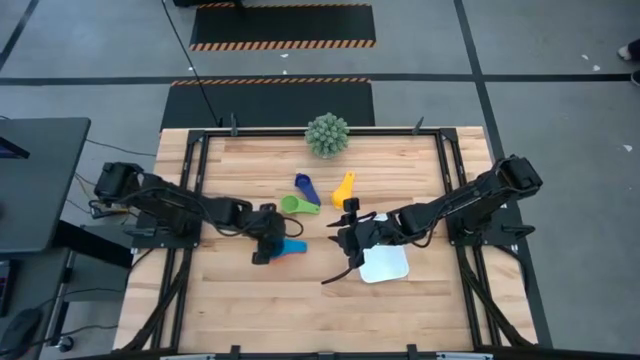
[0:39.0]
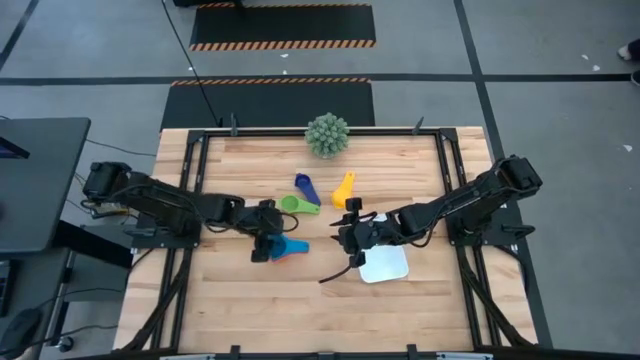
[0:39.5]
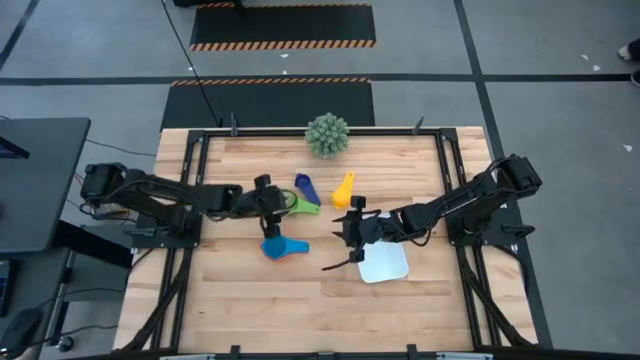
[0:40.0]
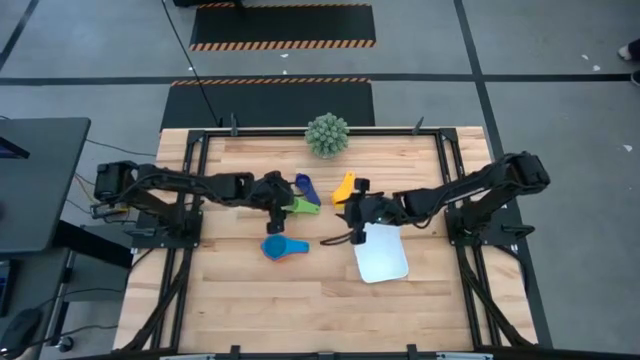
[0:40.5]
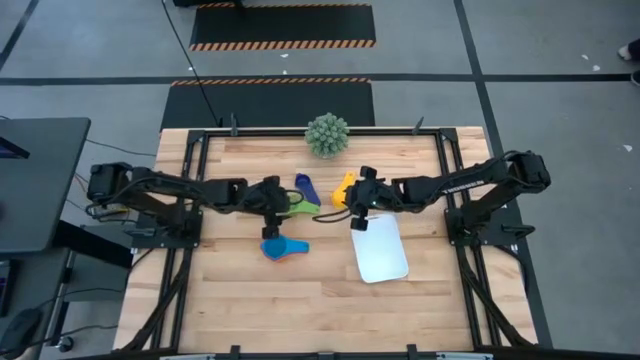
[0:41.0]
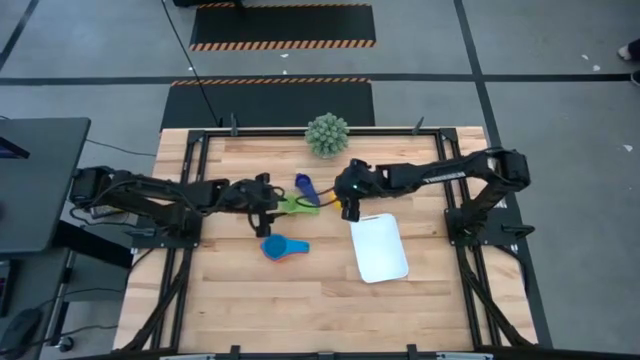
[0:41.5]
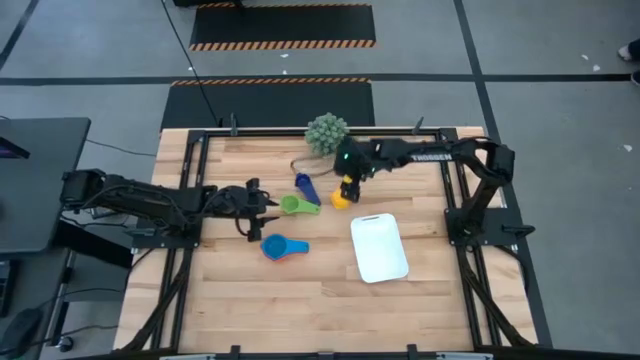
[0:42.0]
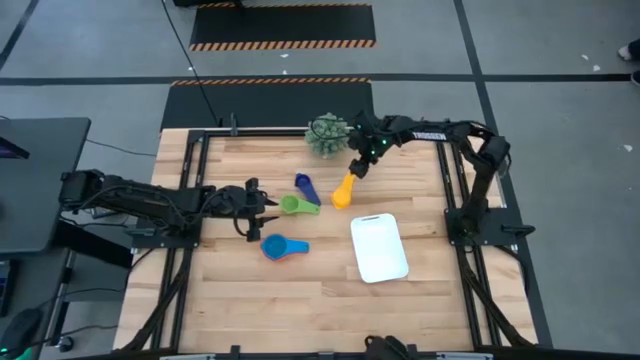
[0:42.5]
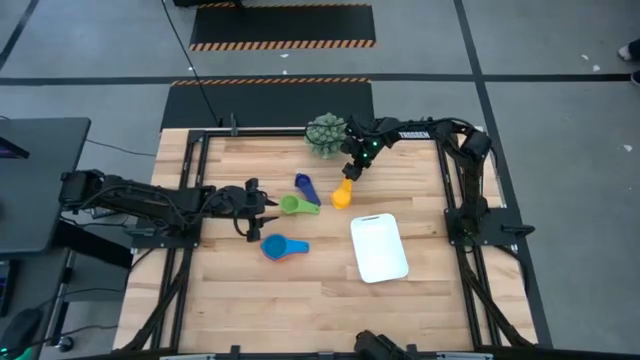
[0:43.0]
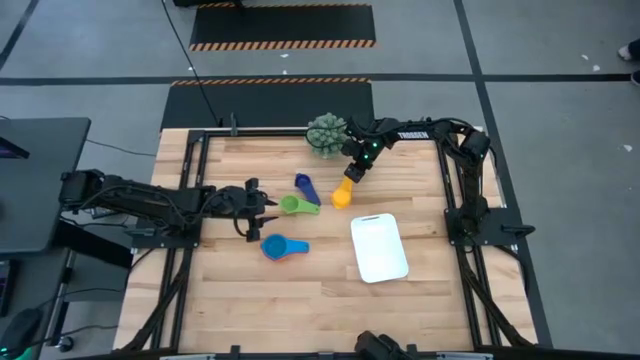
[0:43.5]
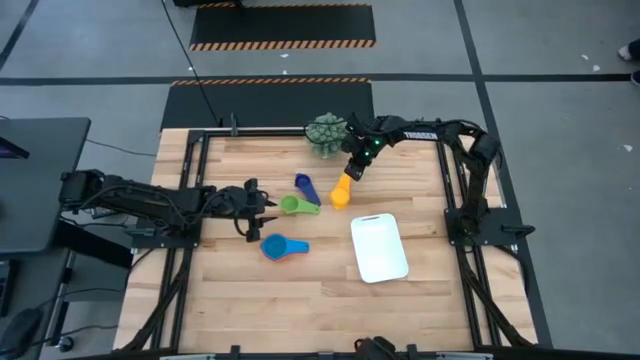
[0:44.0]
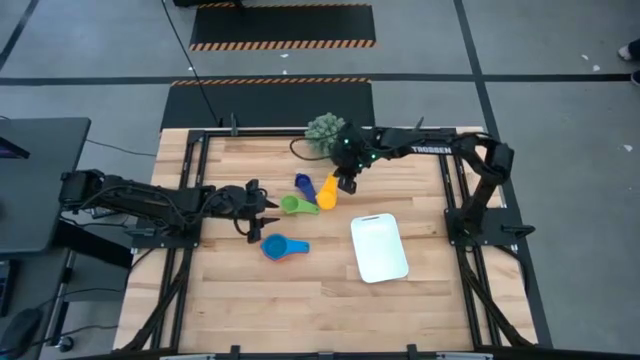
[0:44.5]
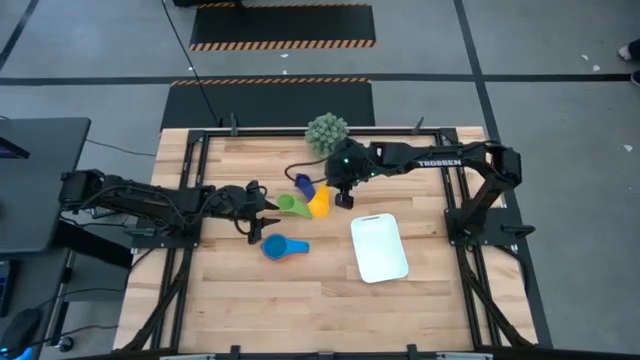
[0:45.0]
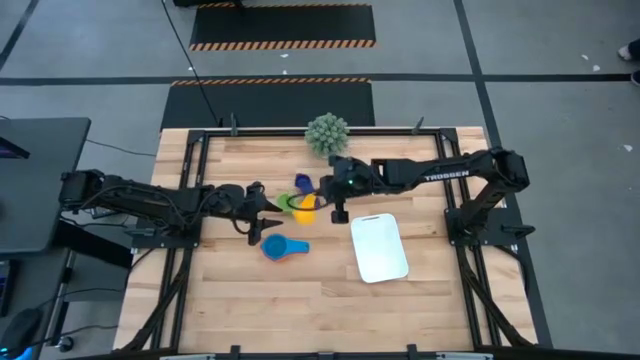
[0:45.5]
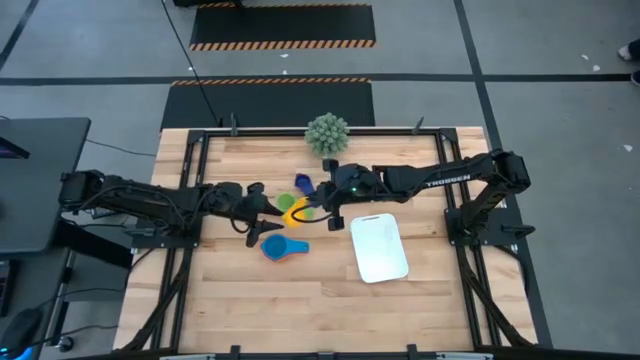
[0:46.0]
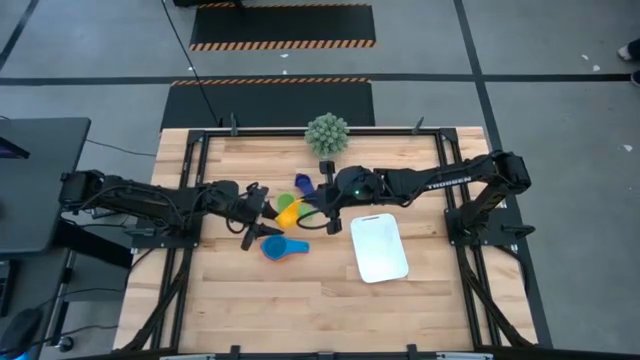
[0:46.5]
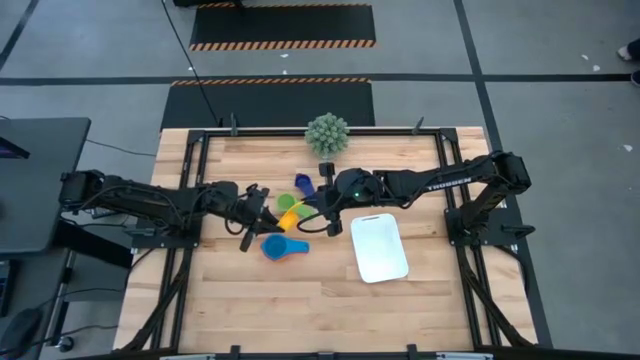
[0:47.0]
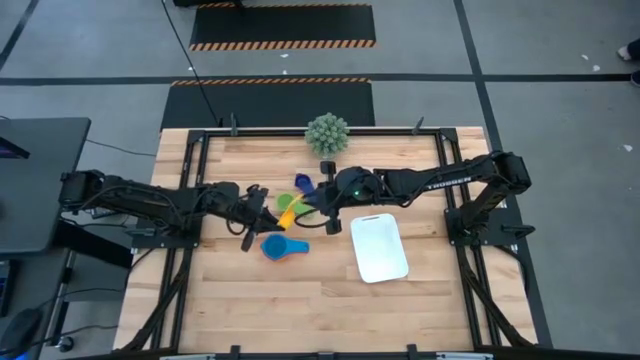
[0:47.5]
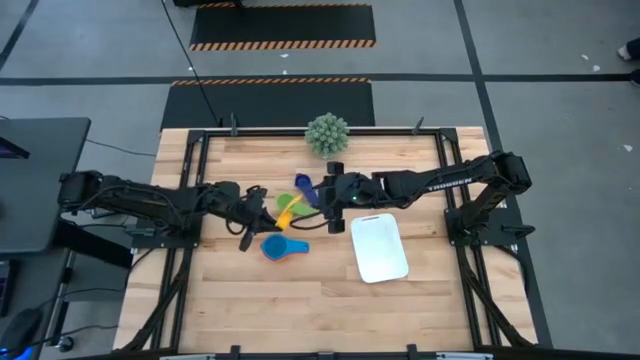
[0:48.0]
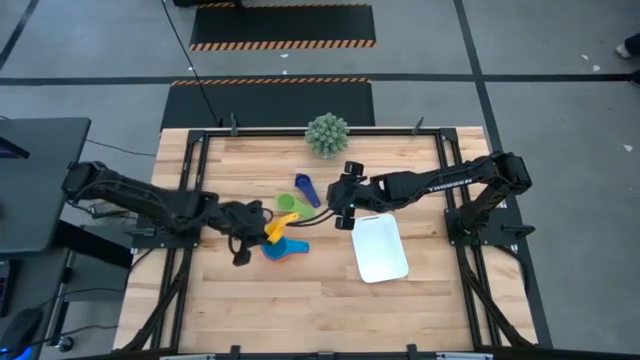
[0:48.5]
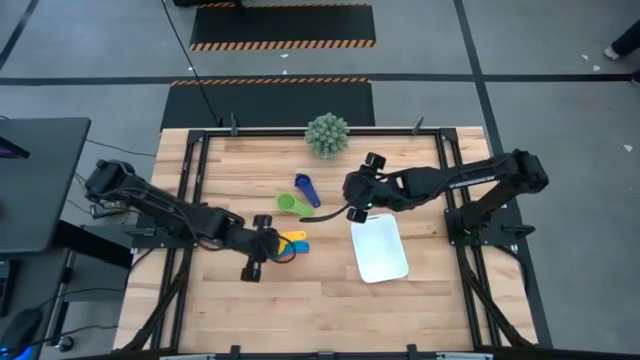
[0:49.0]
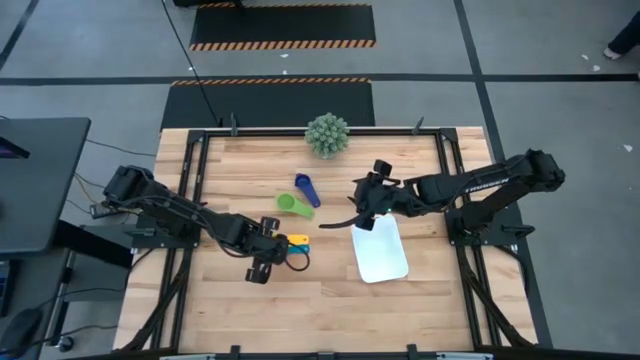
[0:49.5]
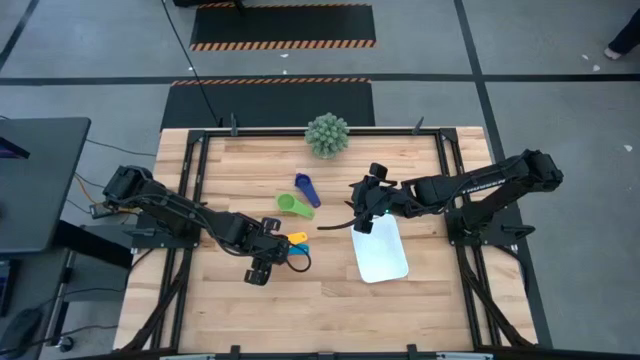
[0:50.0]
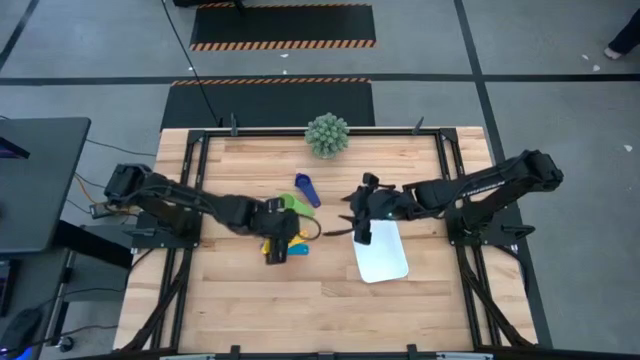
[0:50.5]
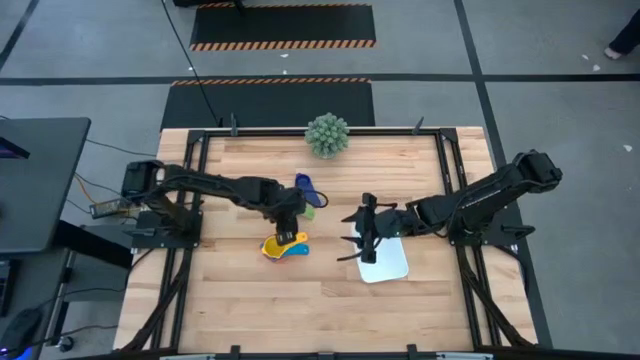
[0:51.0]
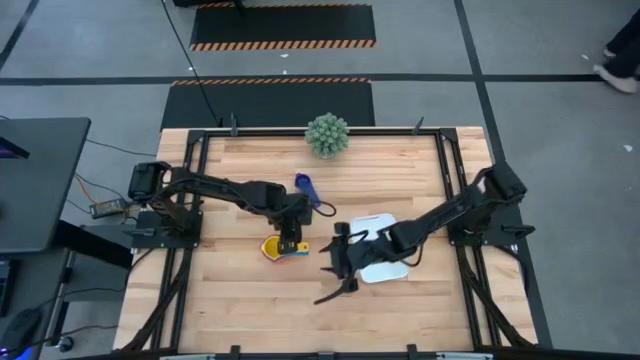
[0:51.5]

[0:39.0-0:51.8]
Task: Nest measuring cups in basket
Stack the yellow measuring cup into the light blue measuring cup

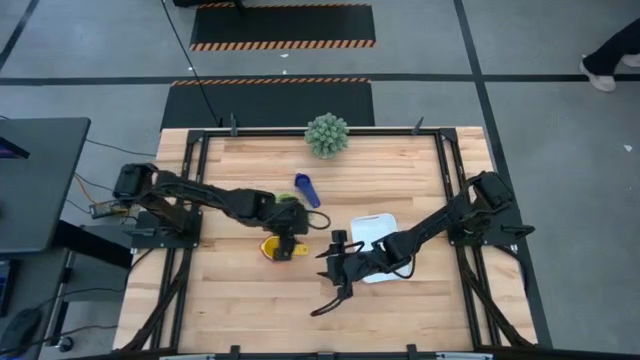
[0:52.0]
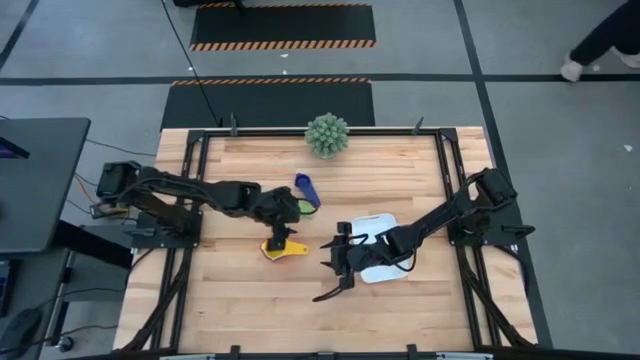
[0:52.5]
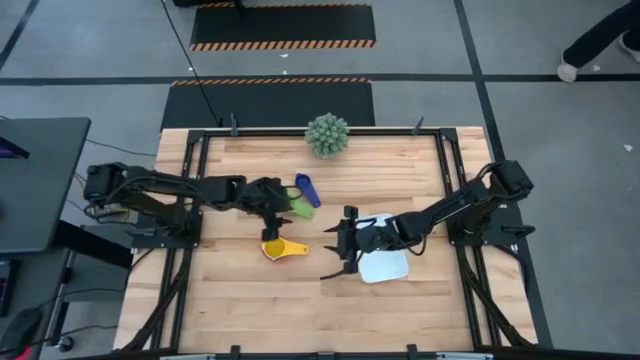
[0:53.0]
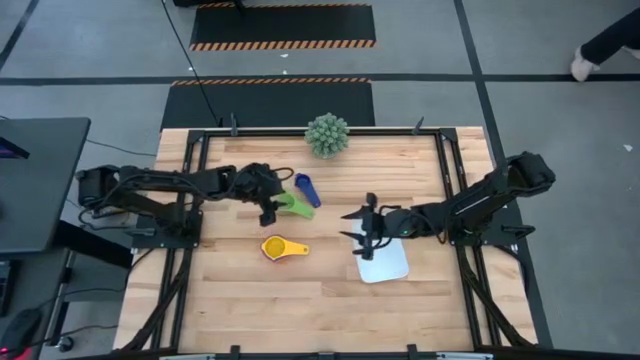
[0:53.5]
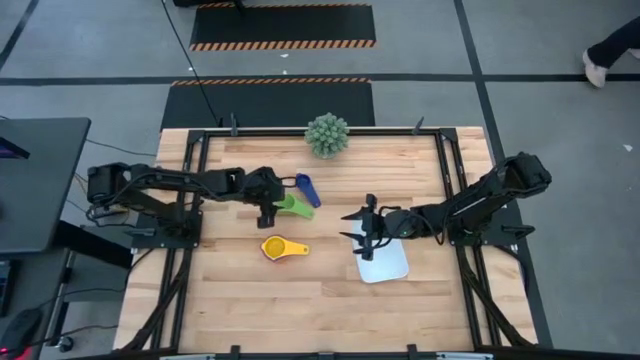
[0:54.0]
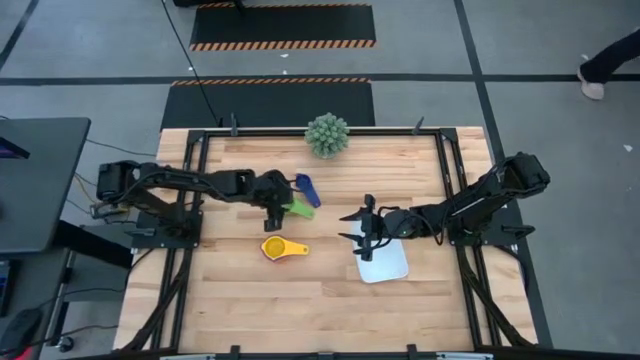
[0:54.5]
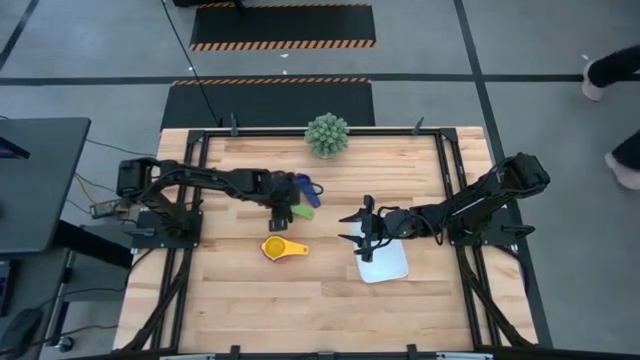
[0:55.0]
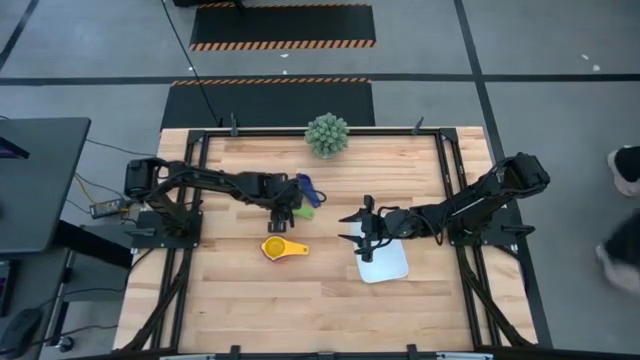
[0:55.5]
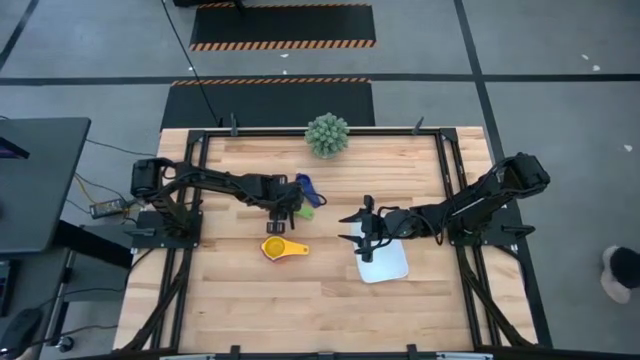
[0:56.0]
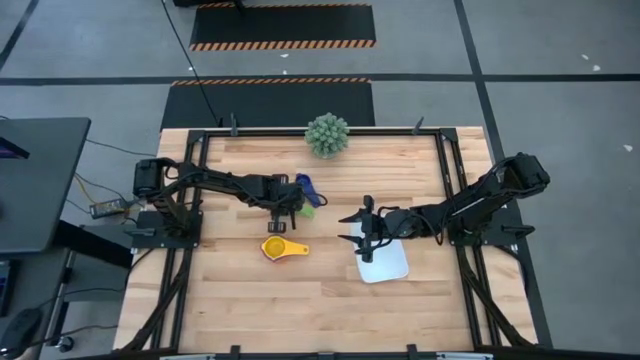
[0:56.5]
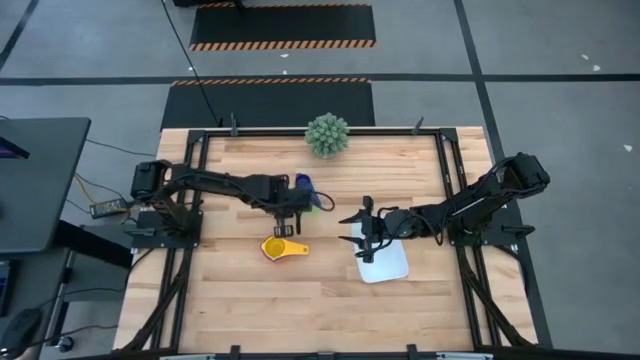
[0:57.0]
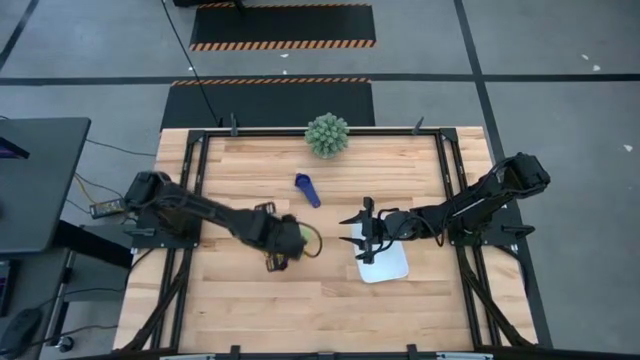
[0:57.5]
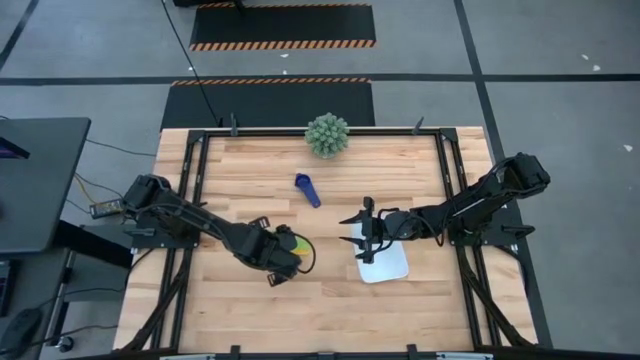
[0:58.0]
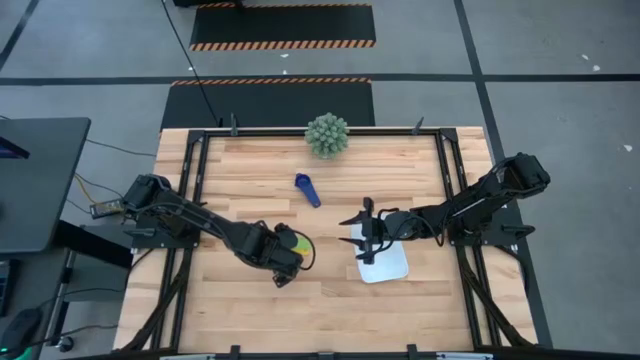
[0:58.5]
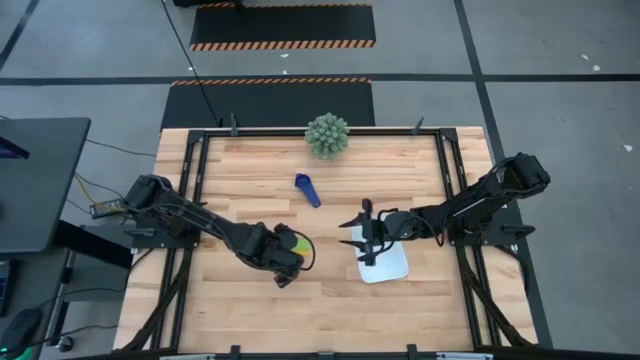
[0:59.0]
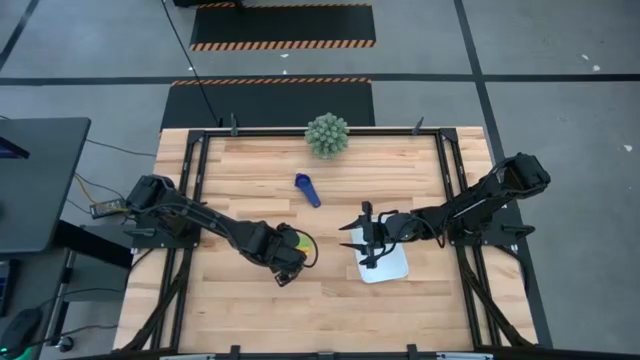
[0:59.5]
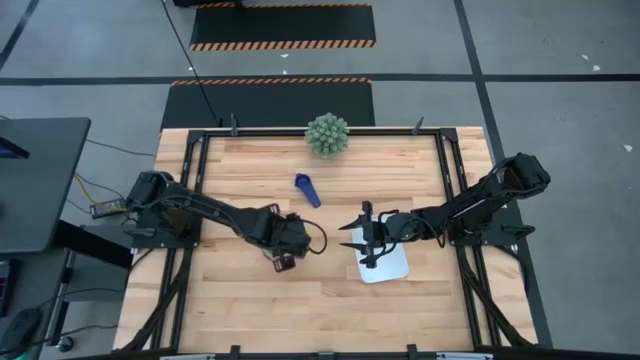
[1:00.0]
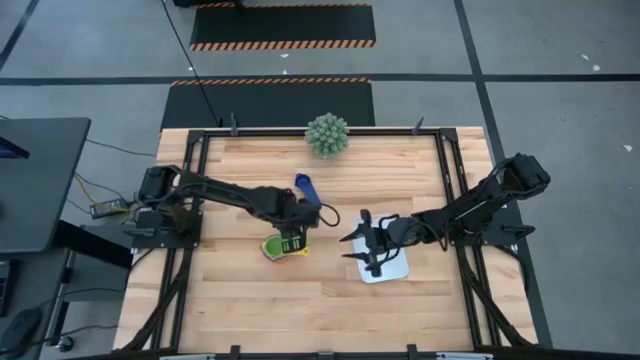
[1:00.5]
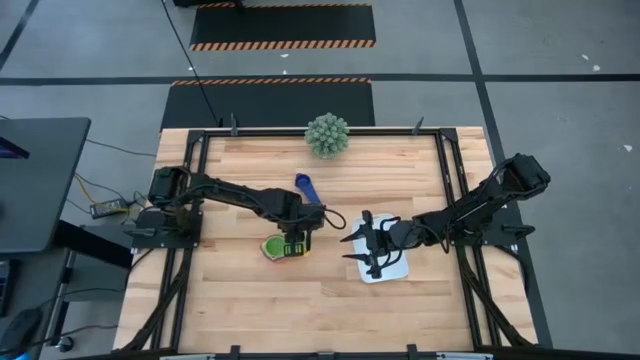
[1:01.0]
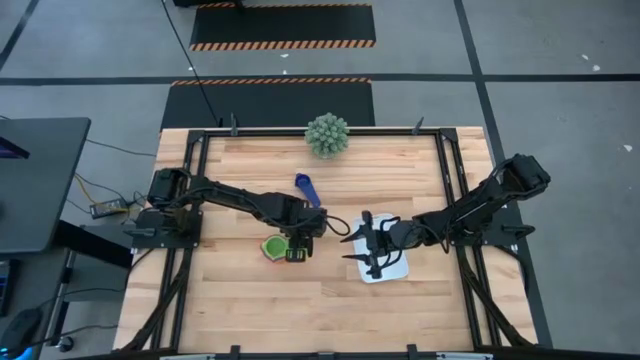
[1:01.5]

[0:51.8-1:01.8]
Stack the green measuring cup into the yellow measuring
